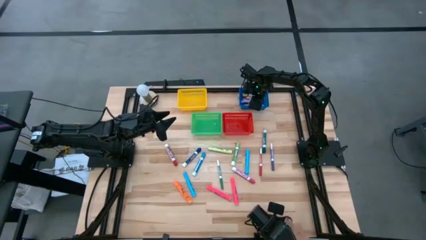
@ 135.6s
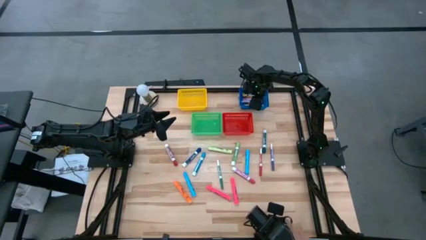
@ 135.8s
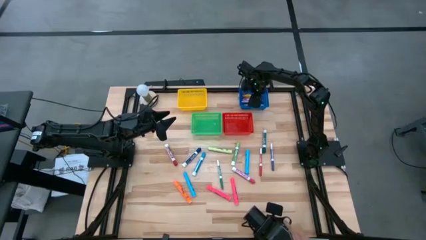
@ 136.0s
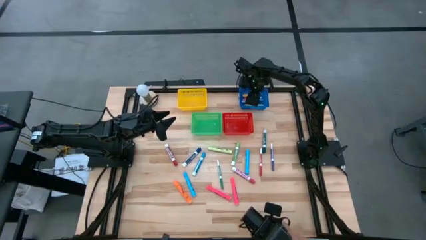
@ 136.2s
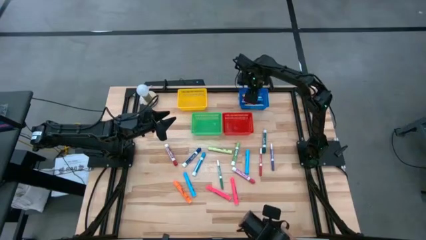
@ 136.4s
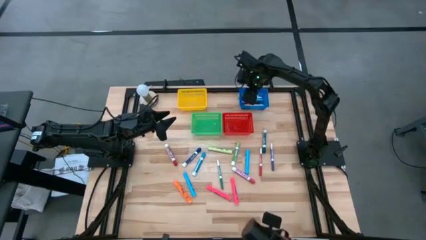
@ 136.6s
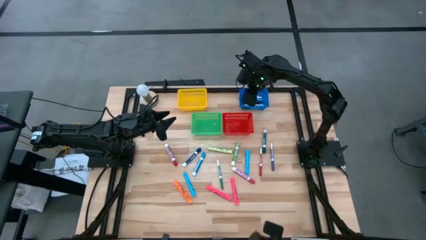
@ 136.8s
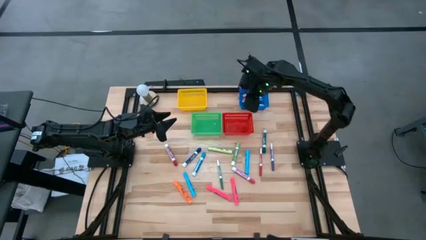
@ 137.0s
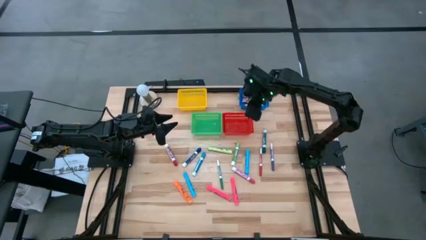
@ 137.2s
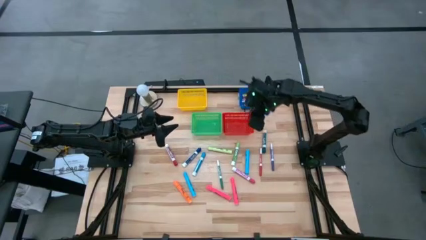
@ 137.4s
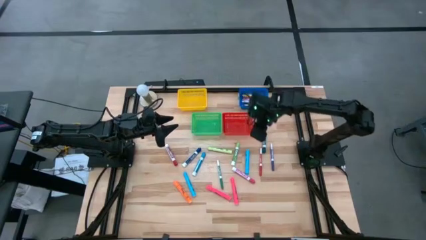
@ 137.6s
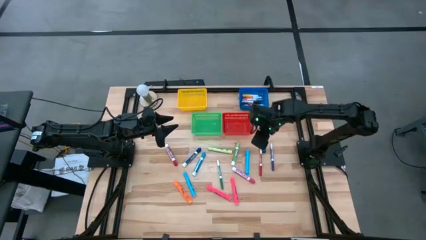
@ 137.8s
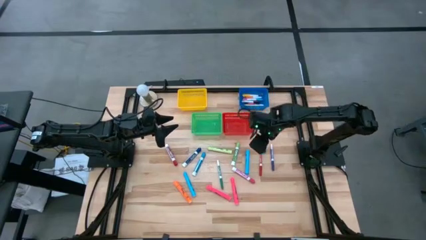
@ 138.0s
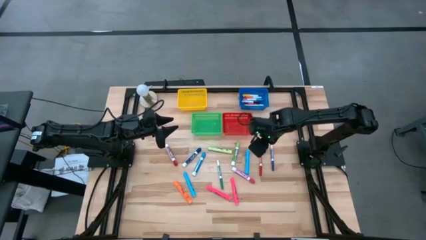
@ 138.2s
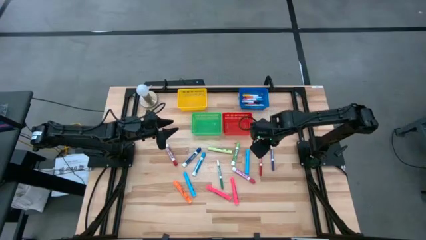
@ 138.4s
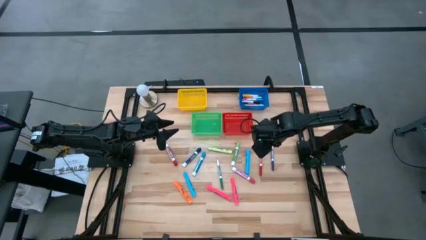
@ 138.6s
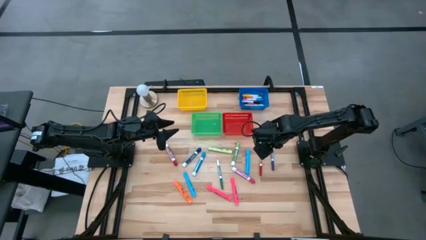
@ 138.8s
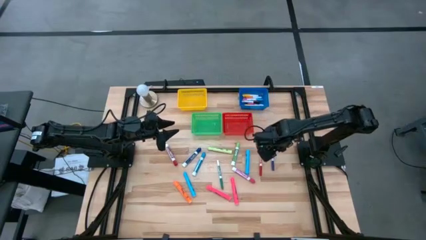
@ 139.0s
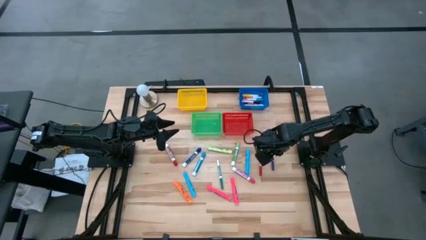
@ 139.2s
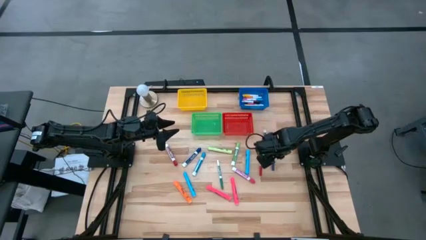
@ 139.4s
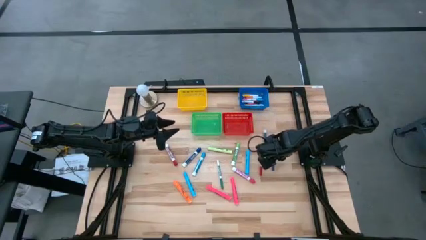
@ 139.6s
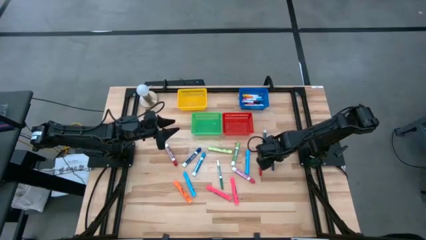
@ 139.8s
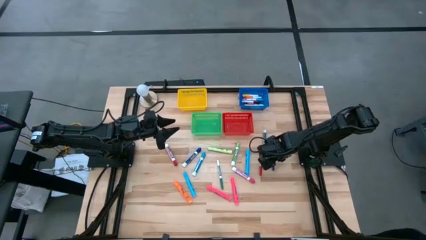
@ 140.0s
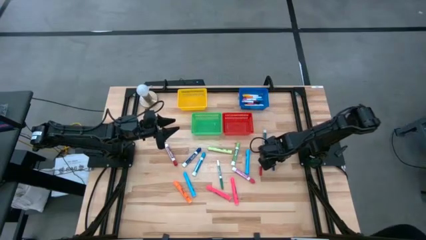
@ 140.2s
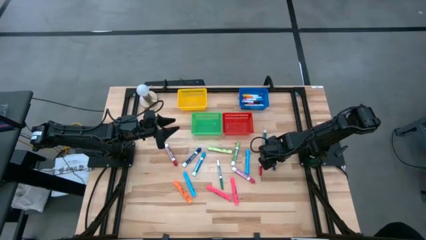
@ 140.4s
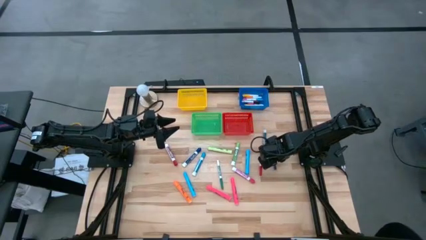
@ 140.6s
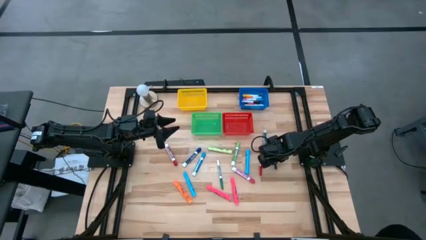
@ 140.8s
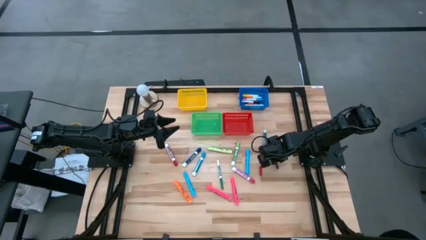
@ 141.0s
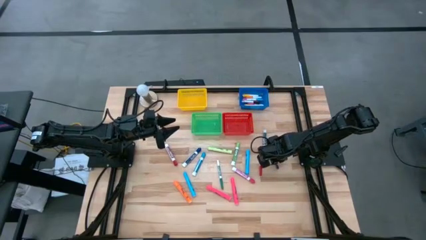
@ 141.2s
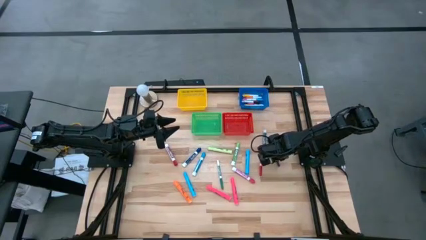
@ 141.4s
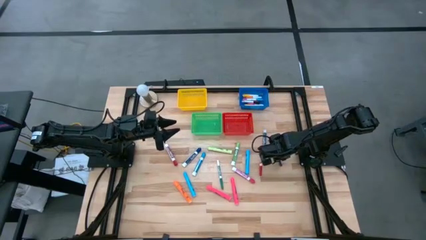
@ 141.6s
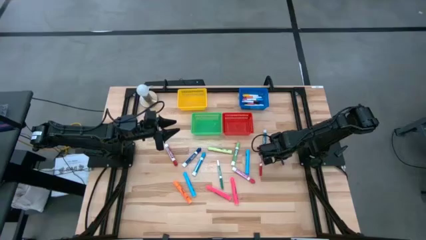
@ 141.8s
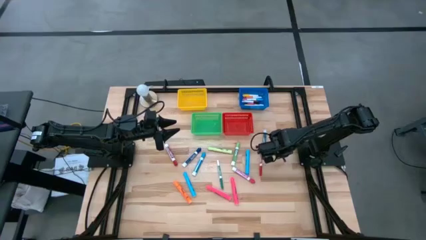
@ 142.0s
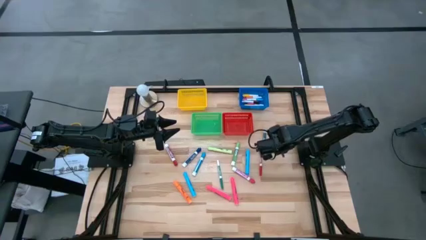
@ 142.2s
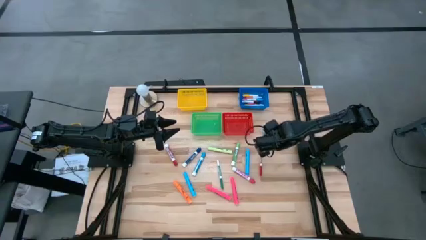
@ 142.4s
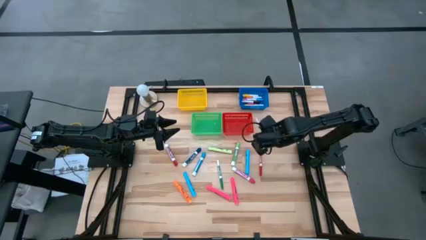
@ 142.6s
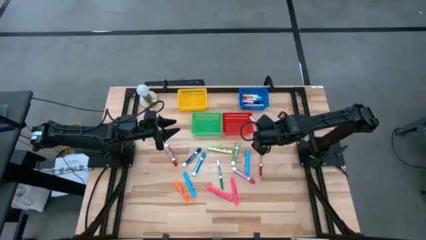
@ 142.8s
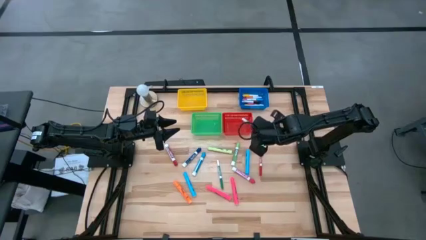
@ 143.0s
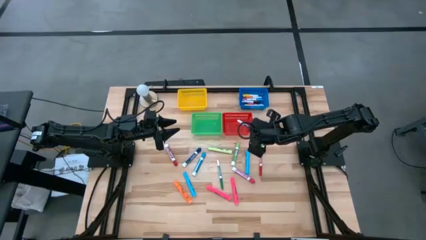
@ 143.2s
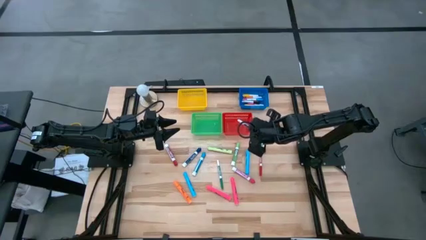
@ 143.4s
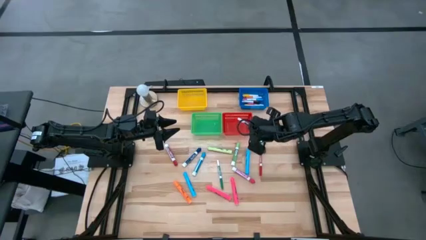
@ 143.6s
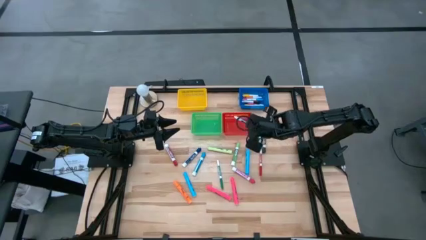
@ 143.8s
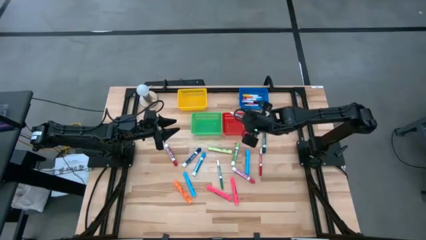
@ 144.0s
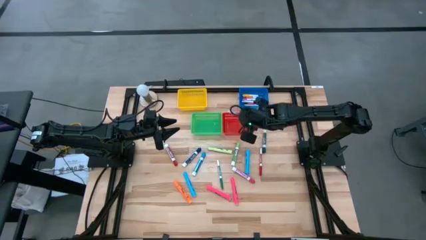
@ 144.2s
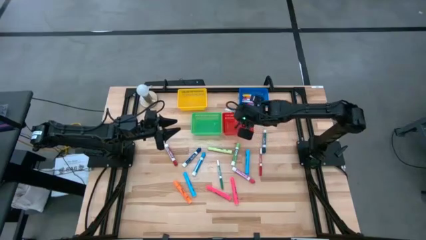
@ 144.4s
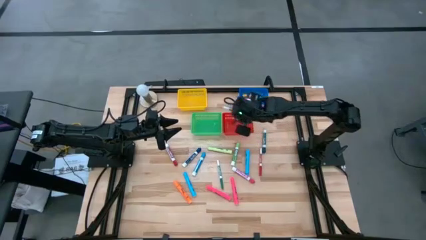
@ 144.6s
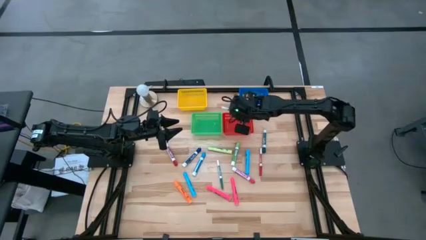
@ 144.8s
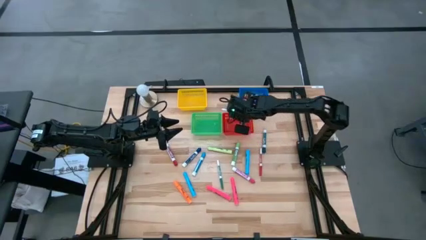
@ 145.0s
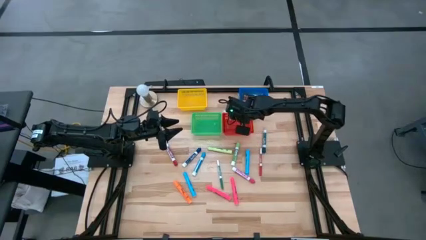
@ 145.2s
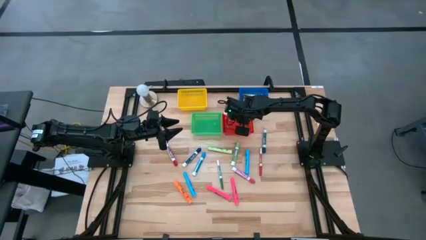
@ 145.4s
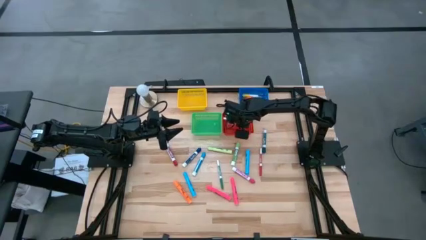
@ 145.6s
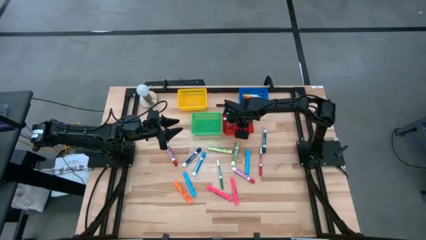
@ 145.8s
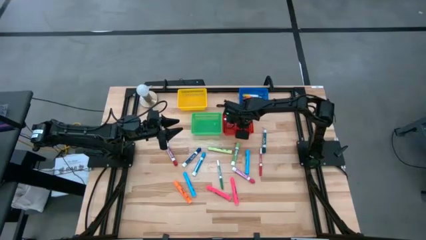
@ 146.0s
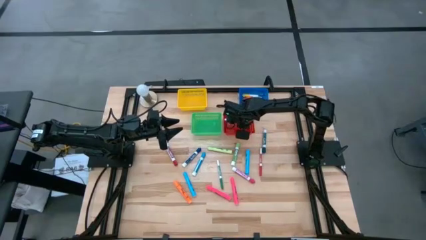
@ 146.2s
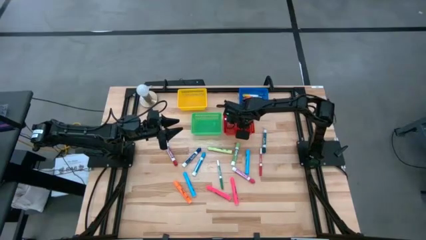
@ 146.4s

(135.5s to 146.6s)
Task: Pick & Place Markers
Put the small blue marker into the red bin

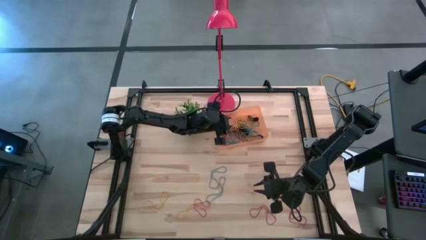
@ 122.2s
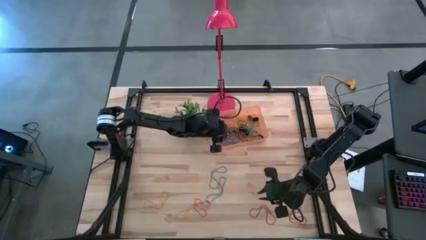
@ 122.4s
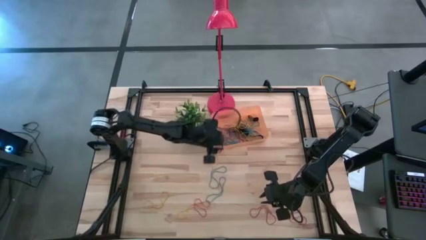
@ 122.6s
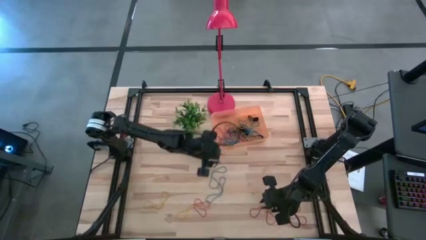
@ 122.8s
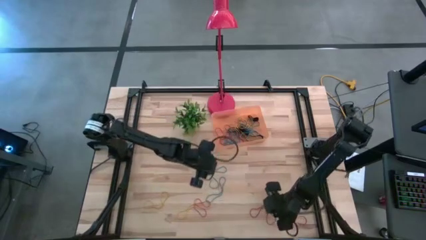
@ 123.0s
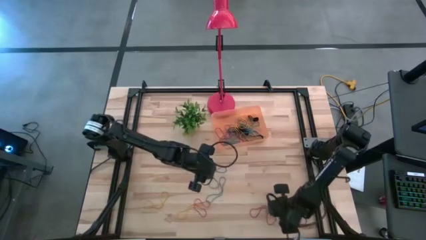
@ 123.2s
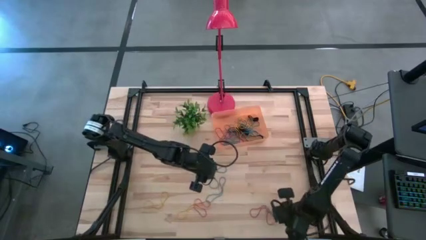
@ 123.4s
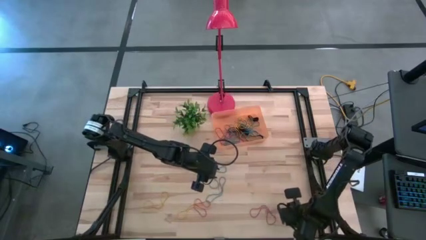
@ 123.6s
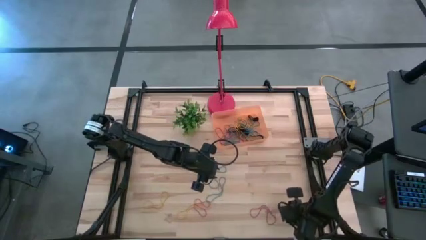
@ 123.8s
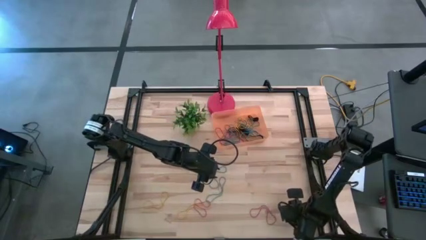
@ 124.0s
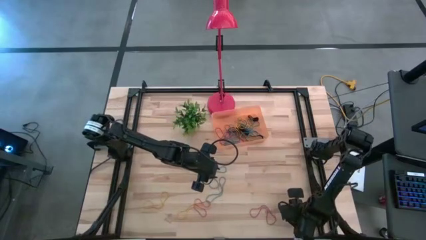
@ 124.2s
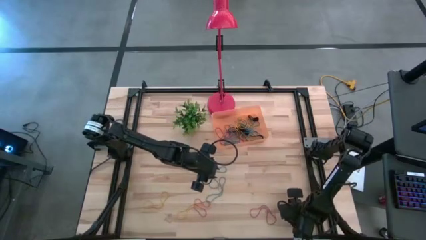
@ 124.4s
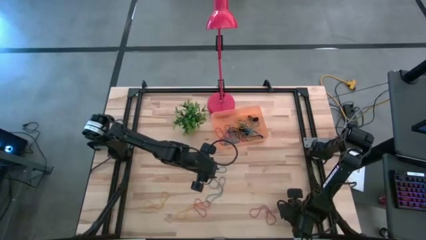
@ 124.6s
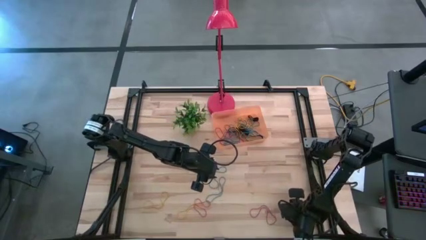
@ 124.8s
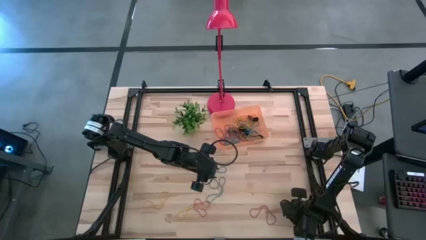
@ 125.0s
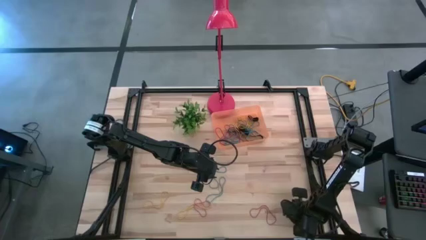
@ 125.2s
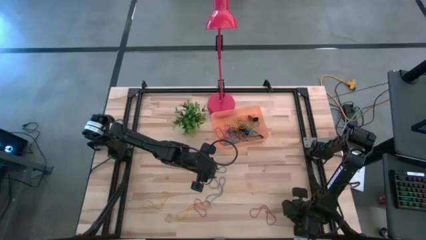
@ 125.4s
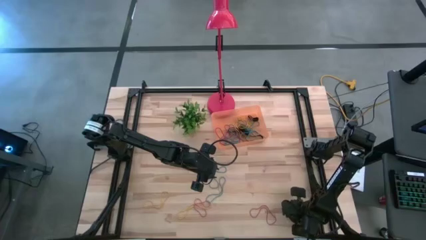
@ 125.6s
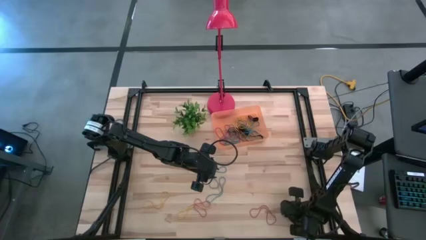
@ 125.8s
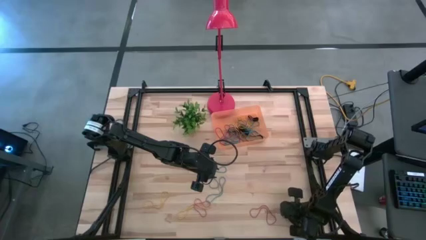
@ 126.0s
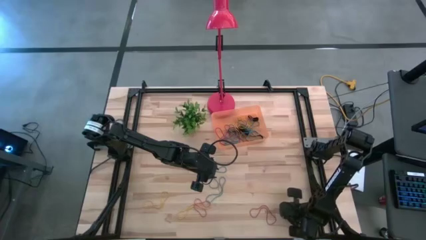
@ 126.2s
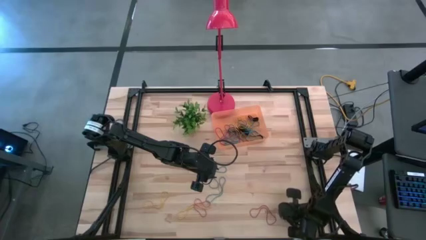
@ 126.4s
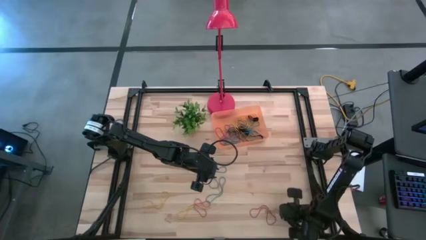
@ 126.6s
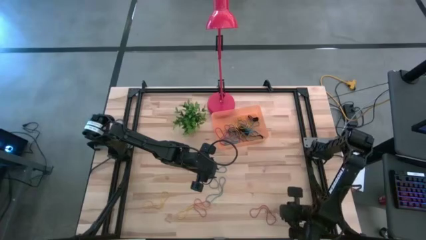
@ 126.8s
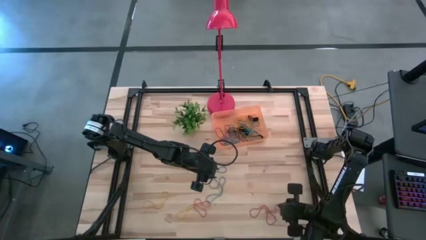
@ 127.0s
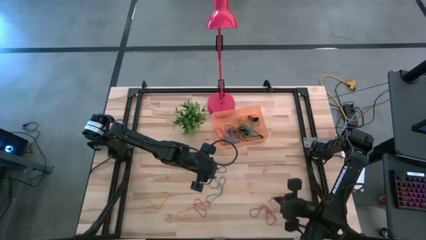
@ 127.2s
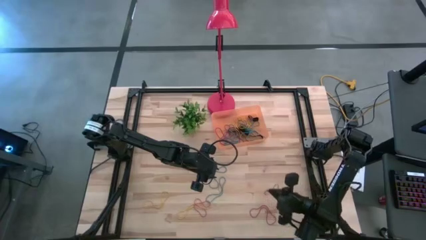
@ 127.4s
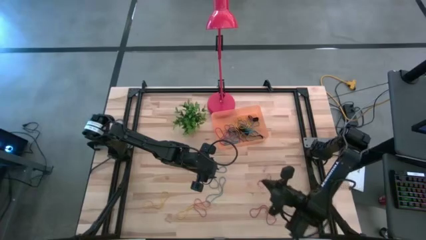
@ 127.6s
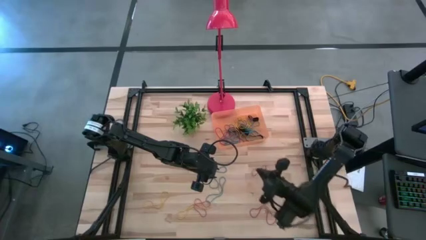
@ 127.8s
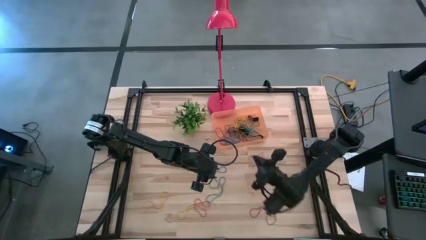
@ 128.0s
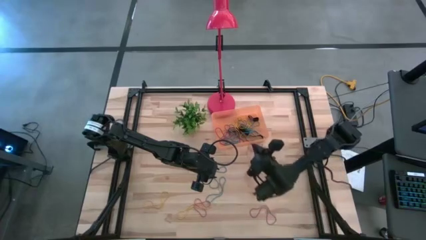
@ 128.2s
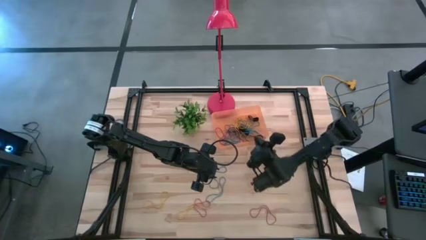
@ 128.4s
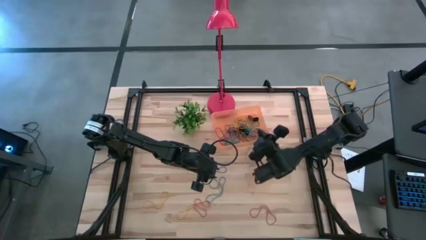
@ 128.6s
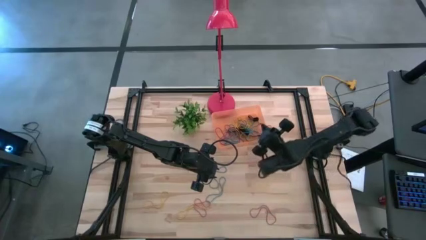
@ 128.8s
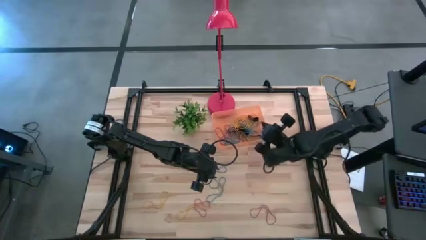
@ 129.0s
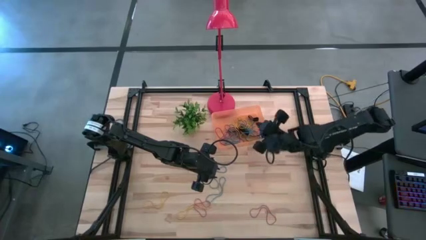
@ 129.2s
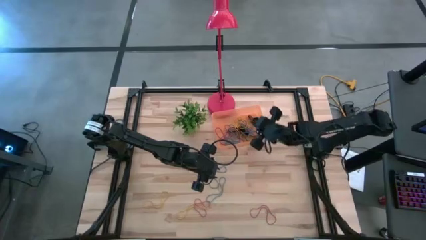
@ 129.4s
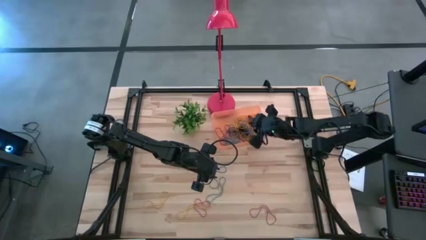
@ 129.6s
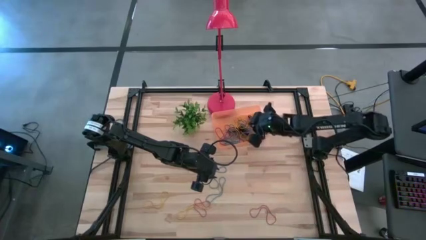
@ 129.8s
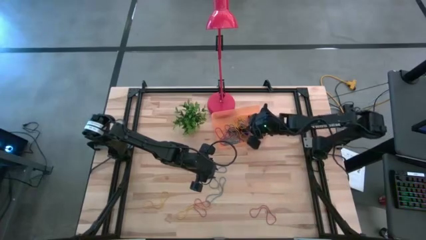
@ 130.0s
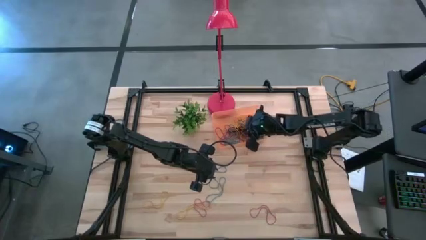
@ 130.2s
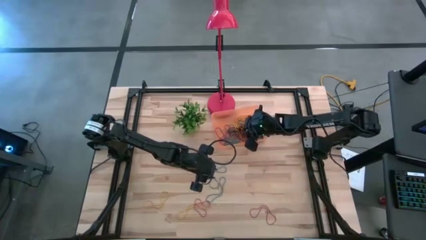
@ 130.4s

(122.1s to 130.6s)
Task: Pick and place rubber bands into bin
Put the right red rubberband into the orange container
